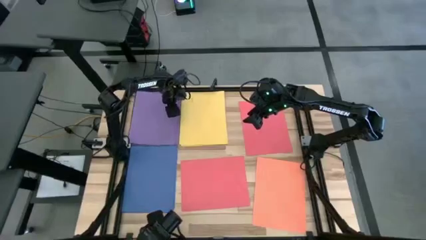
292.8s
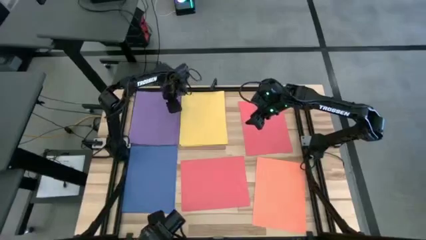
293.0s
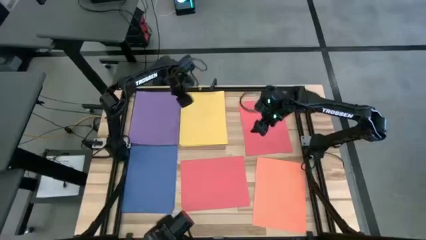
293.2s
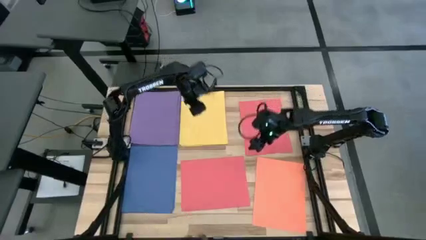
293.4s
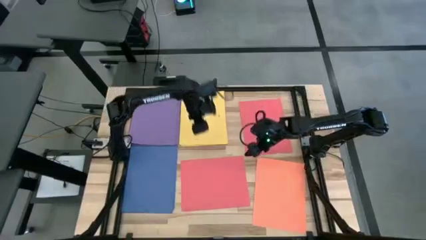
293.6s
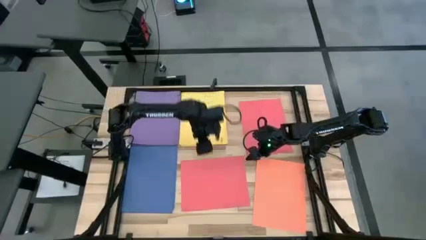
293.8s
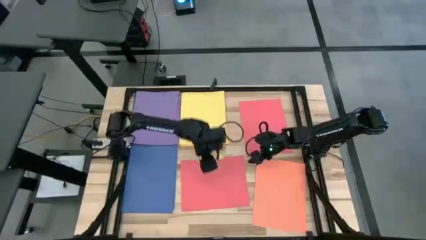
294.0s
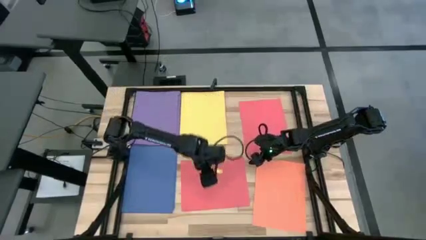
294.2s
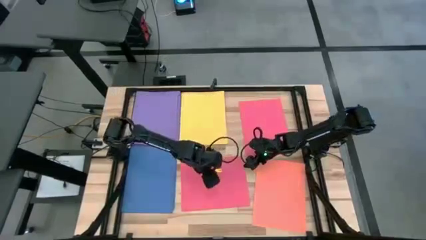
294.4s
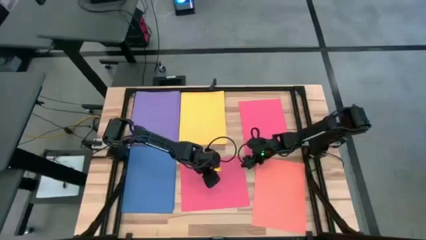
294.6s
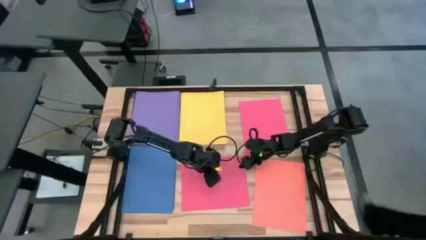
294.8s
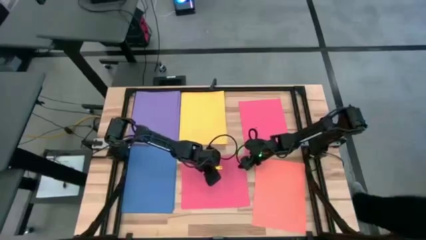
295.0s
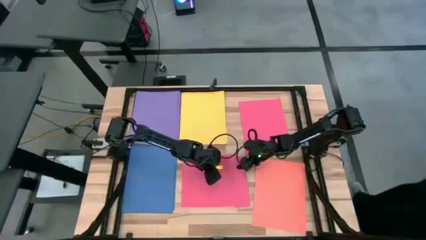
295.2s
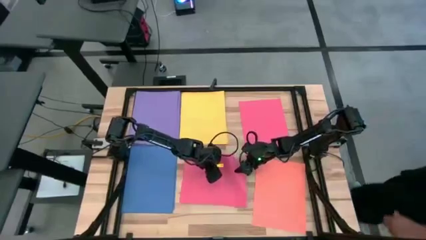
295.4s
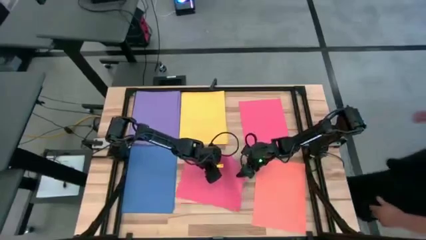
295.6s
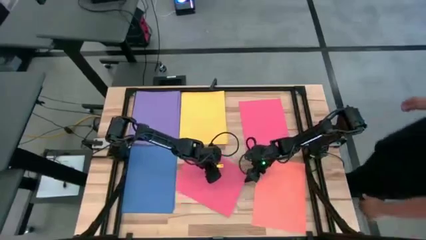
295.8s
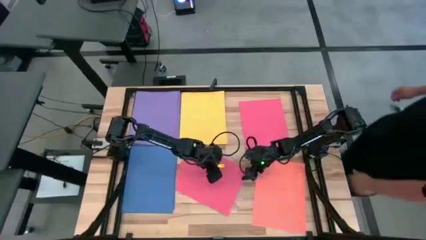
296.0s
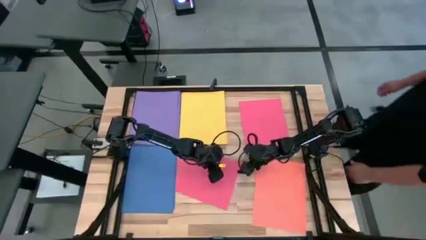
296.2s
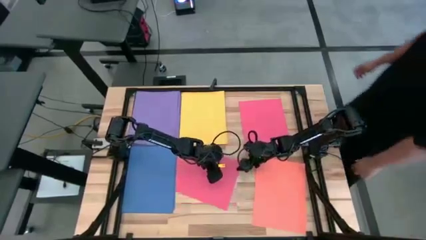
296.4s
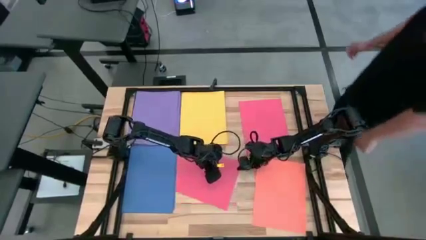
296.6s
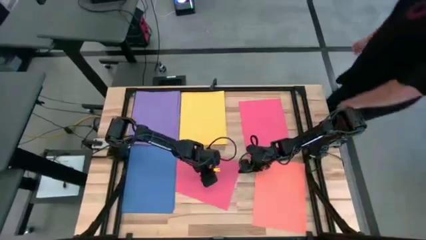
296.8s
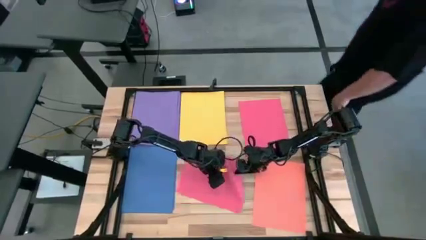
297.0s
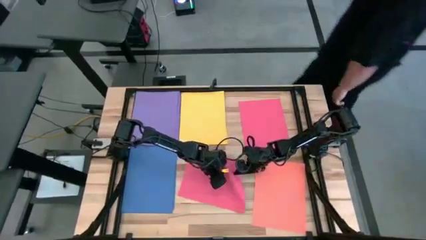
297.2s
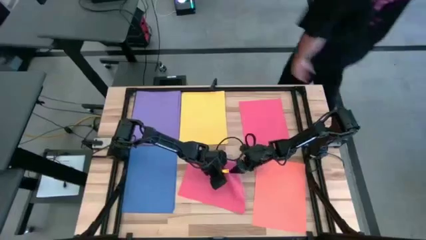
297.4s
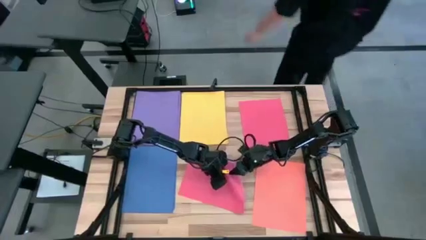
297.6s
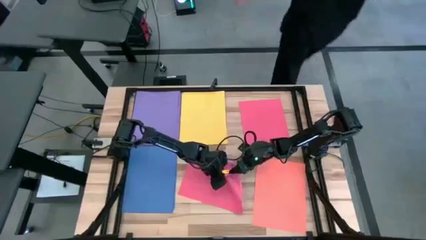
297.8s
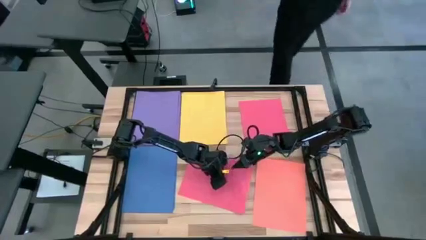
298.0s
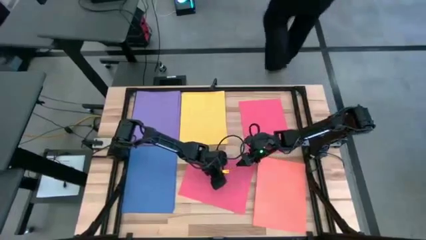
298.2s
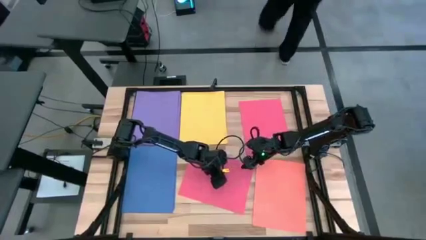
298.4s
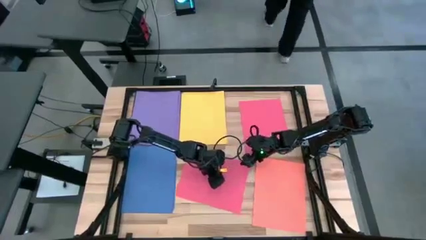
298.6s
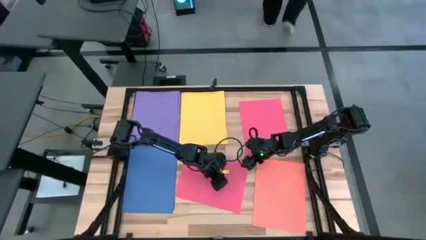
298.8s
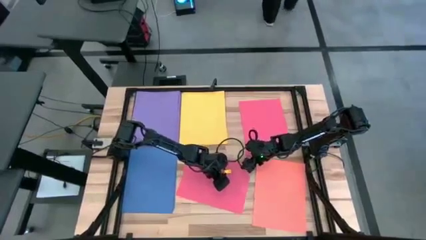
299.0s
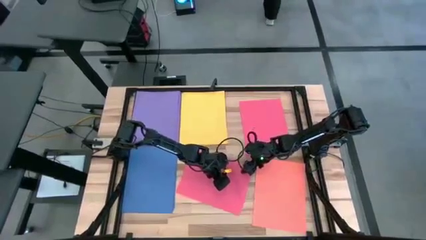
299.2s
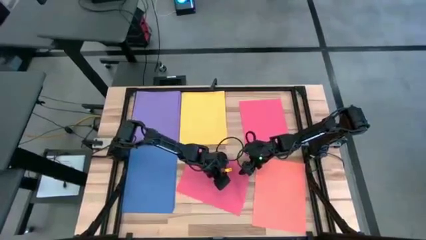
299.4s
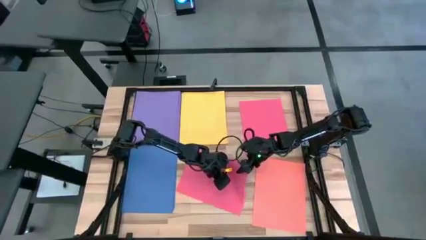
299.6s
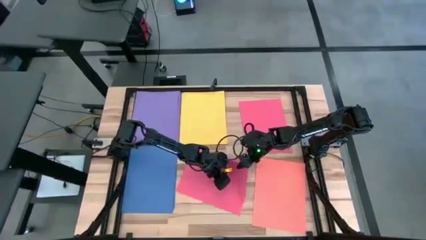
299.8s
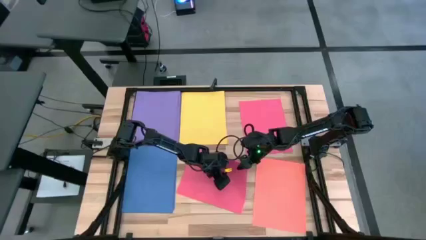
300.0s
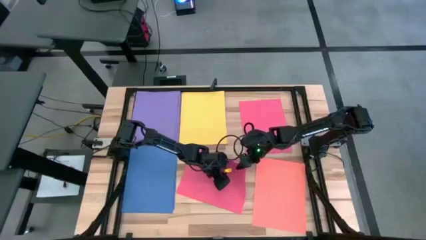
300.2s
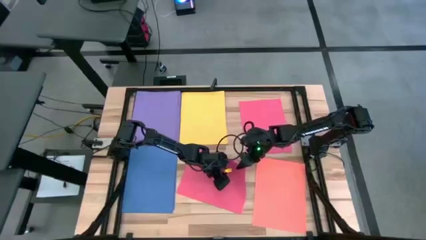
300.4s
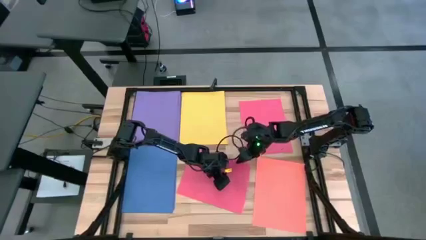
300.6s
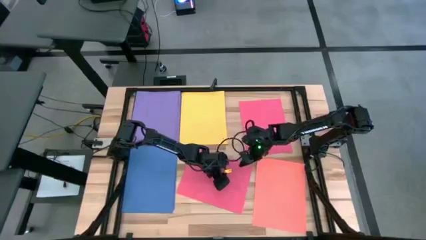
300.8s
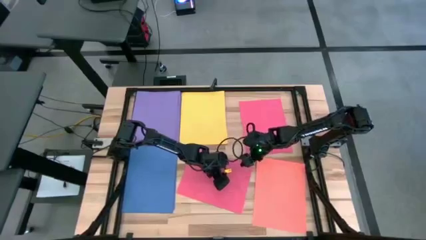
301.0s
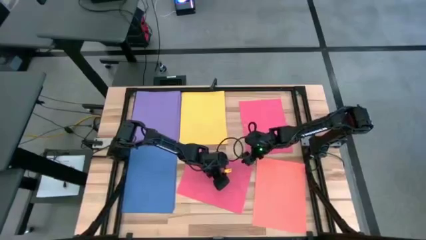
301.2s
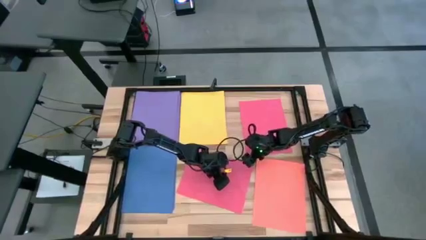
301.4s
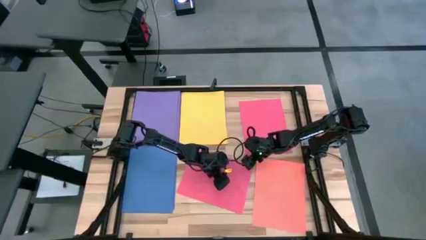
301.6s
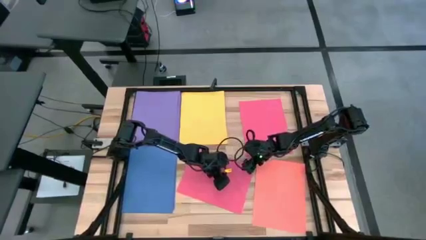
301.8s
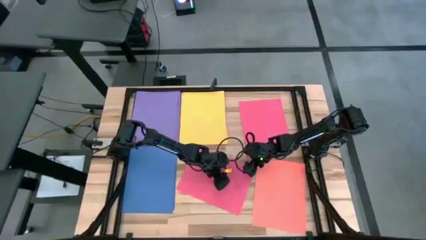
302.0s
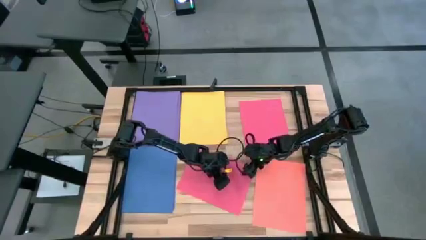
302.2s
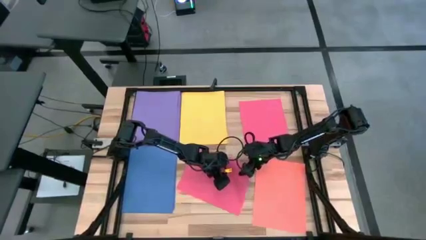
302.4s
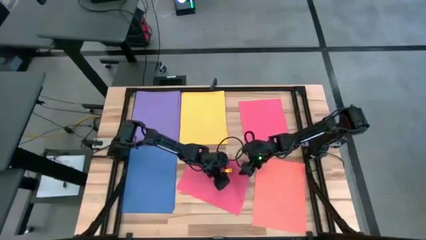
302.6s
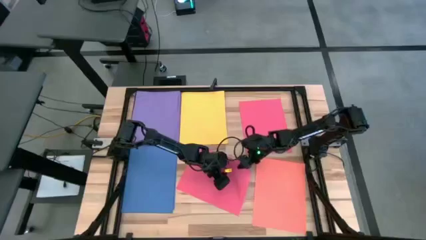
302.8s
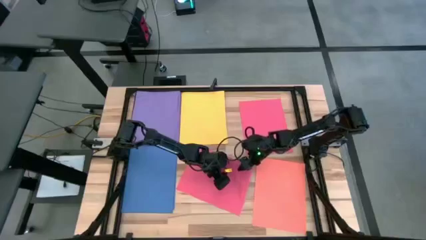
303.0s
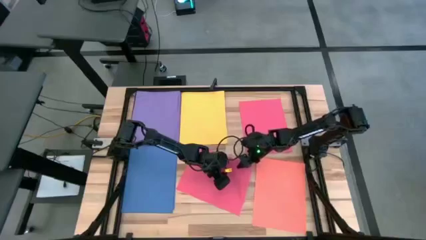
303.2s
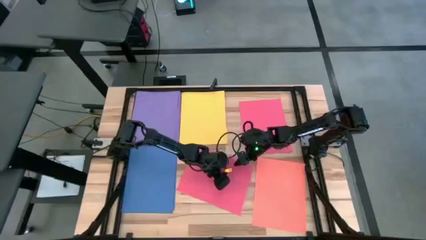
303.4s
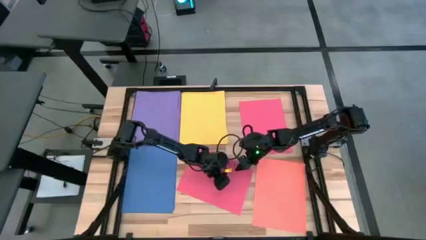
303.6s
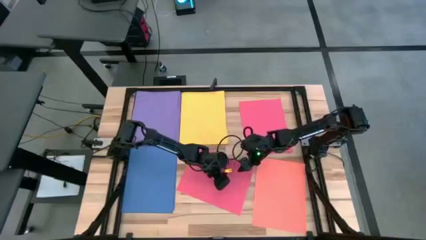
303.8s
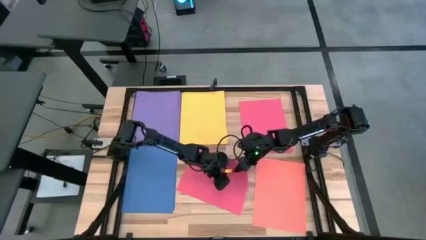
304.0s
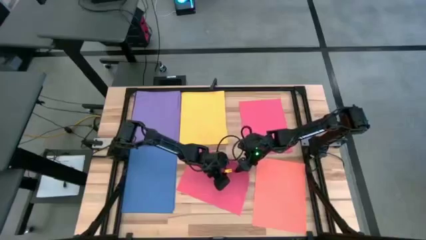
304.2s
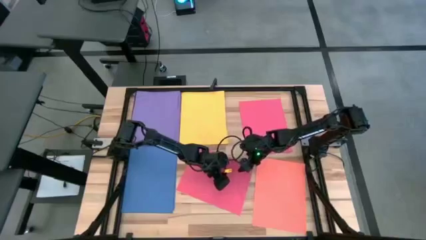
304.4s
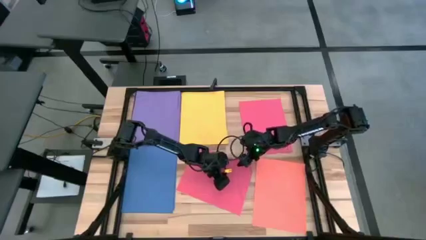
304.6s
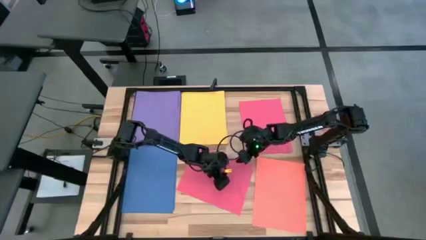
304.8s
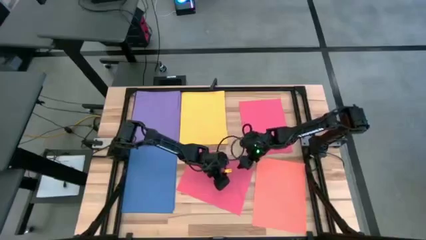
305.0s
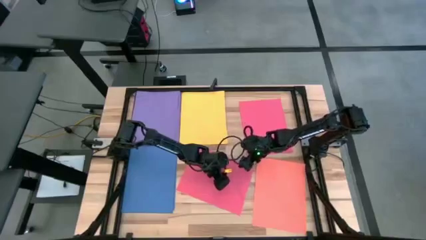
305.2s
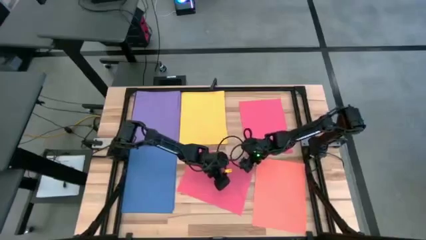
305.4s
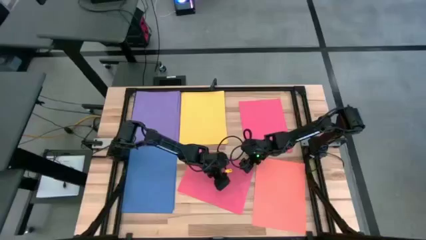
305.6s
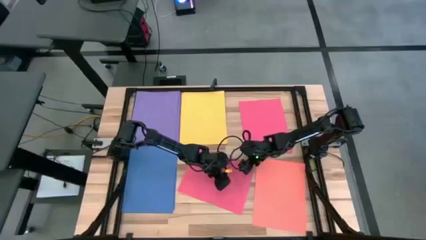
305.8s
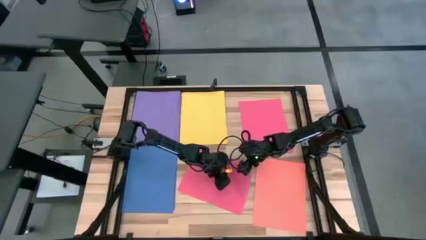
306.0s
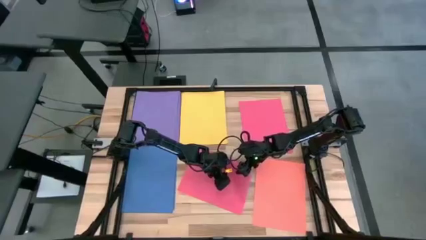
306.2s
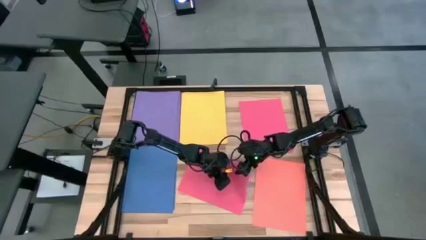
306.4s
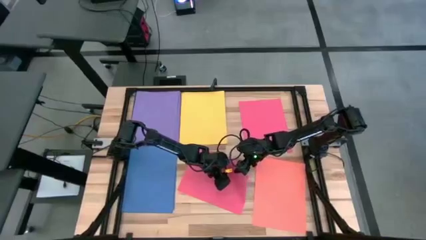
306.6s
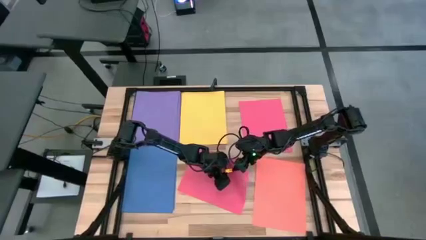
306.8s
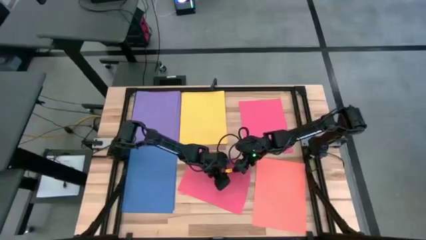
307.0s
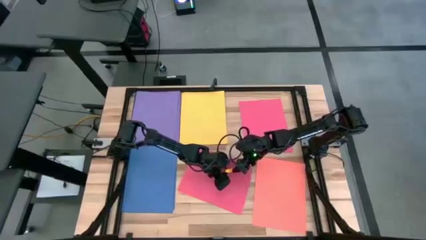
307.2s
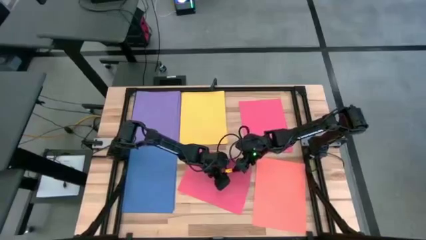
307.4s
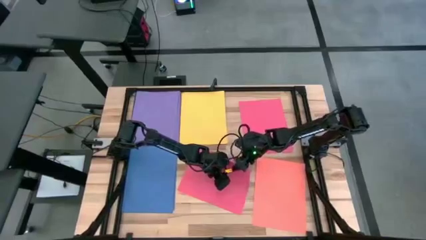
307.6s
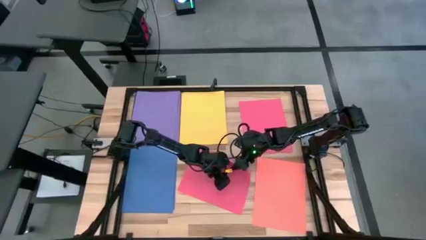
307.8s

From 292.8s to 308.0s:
Task: Organize paper
Stack the red paper on top of the red paper

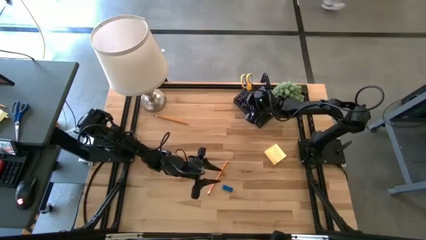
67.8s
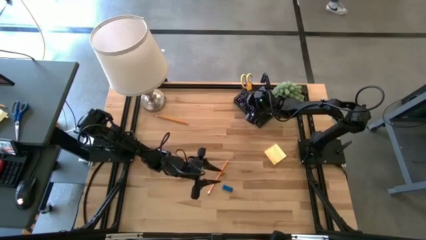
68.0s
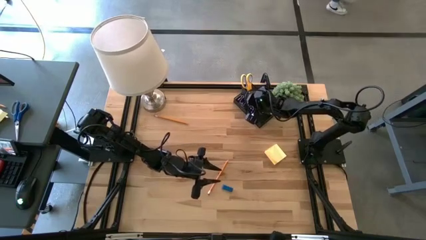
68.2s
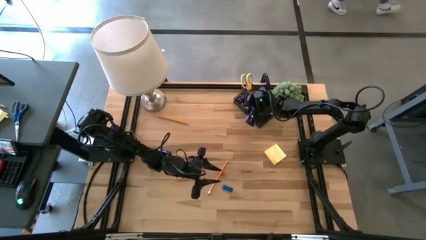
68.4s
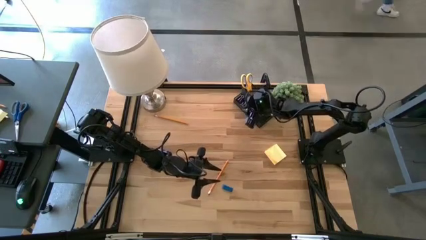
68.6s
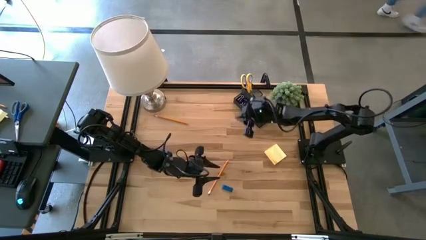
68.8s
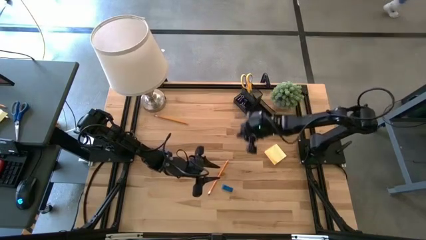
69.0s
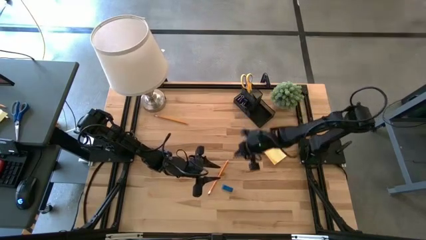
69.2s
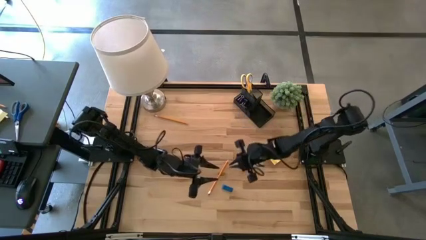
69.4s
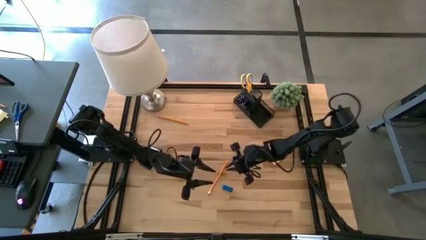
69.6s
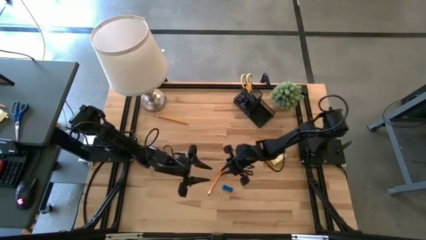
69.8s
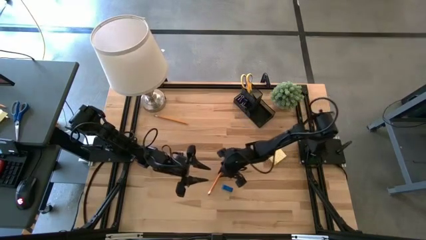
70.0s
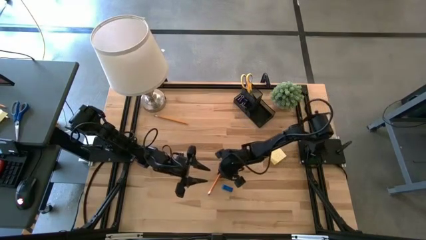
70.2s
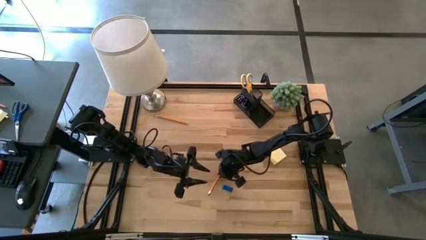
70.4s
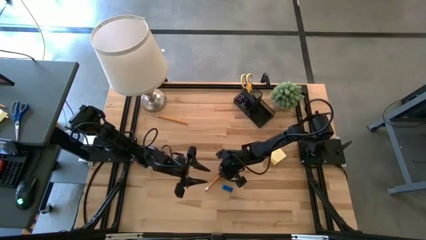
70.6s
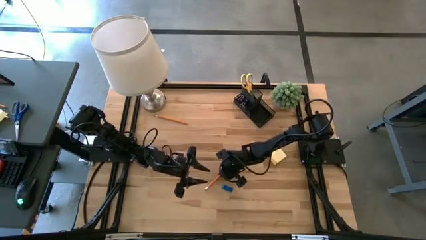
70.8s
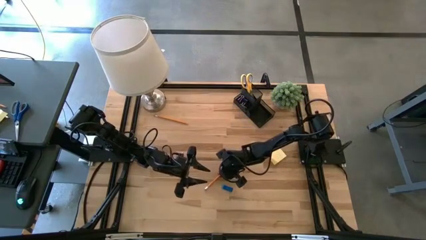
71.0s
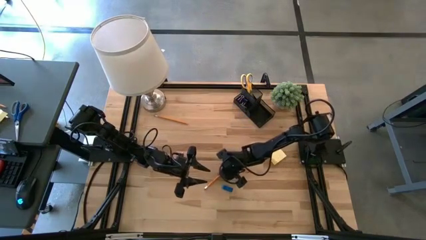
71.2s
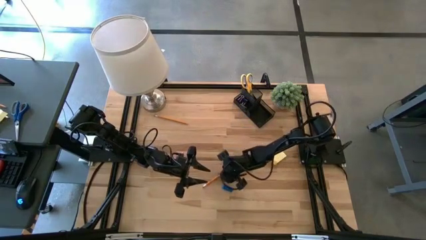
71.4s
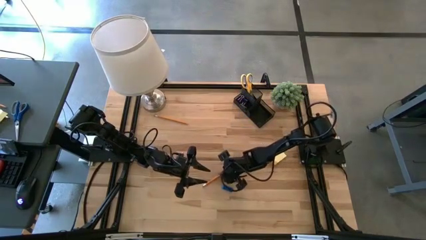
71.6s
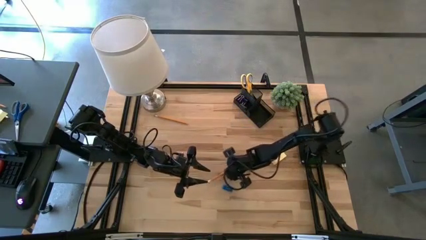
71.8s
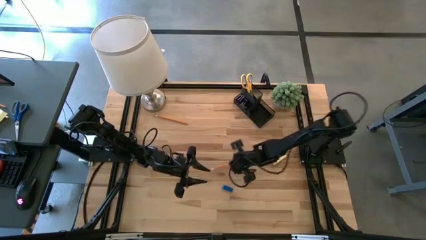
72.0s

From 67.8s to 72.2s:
Task: Pick and place office supplies into organizer
Put the bottom orange pencil into the desk organizer
